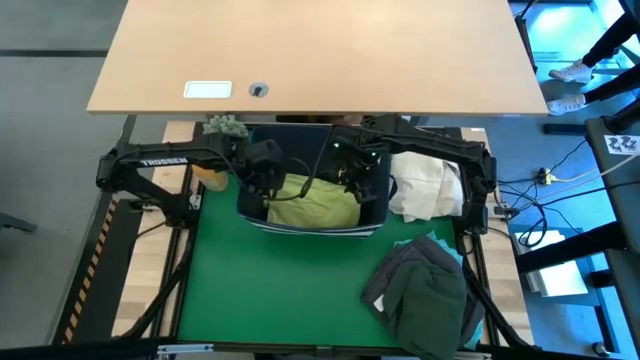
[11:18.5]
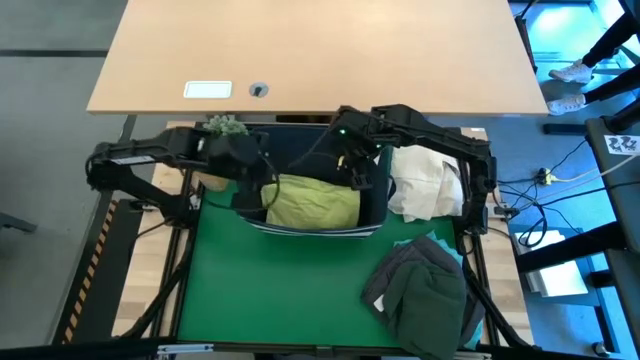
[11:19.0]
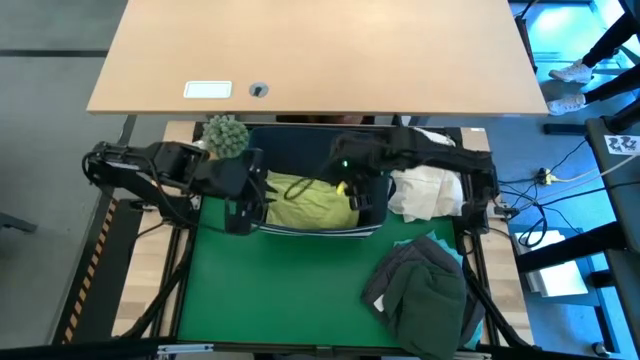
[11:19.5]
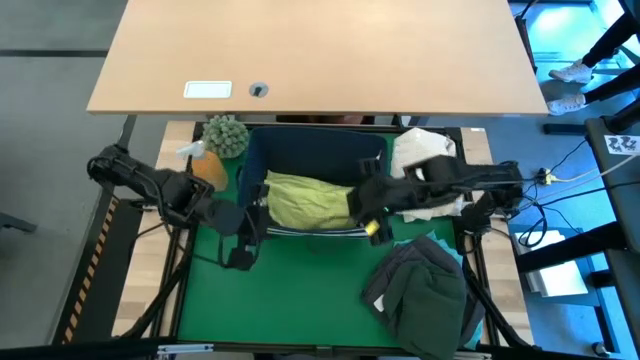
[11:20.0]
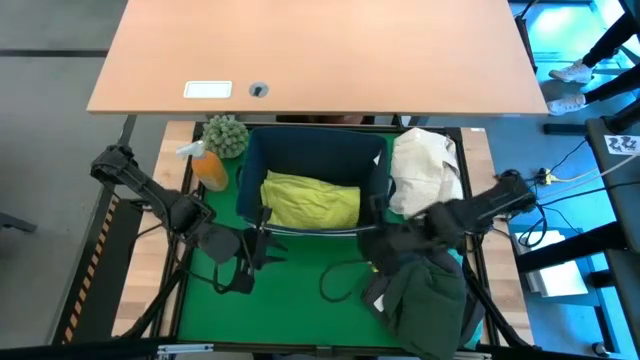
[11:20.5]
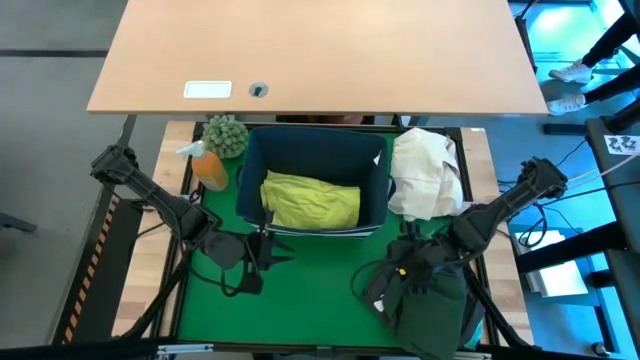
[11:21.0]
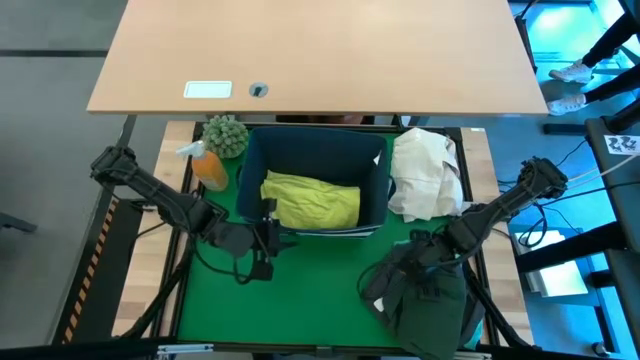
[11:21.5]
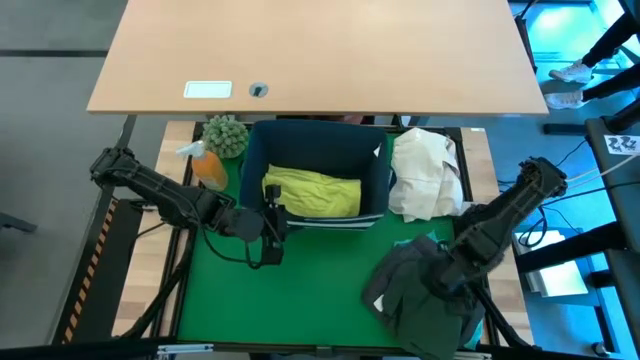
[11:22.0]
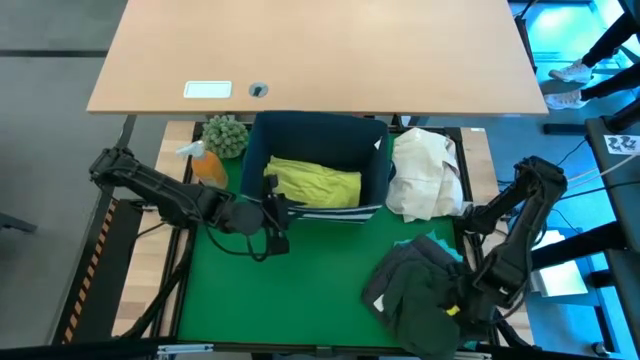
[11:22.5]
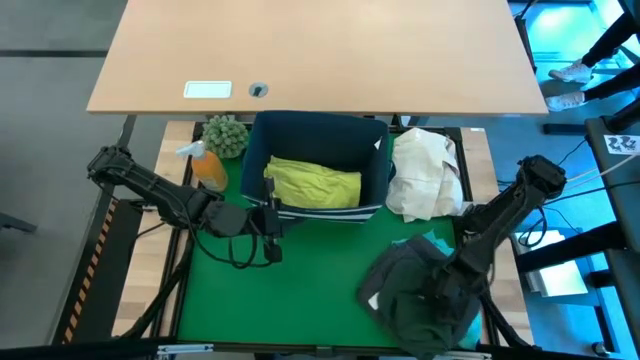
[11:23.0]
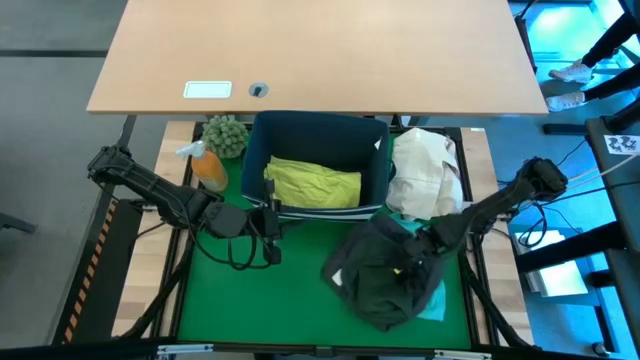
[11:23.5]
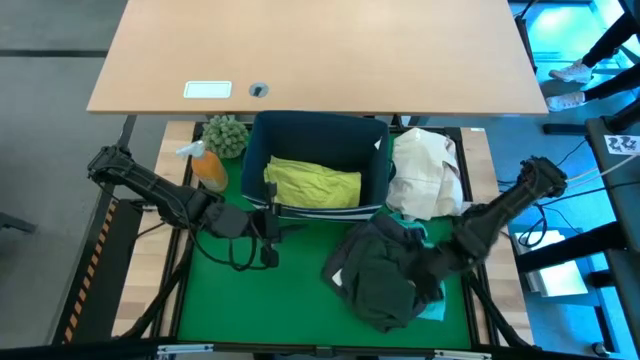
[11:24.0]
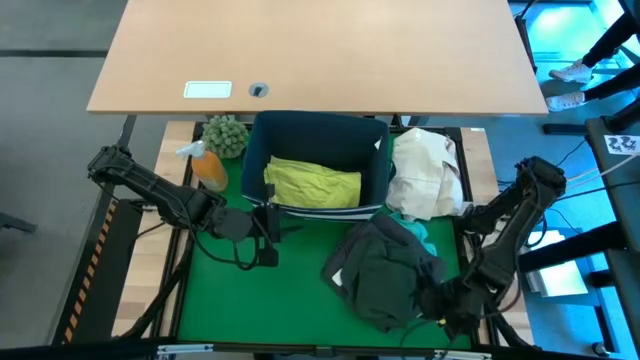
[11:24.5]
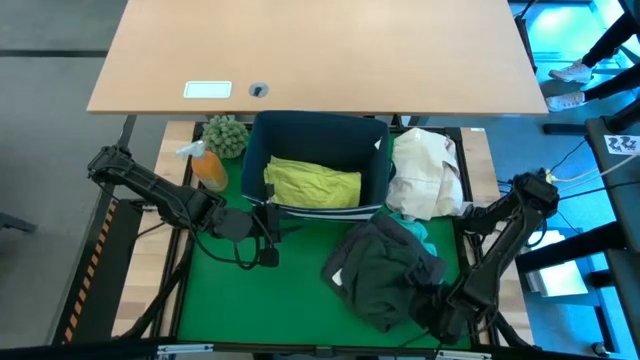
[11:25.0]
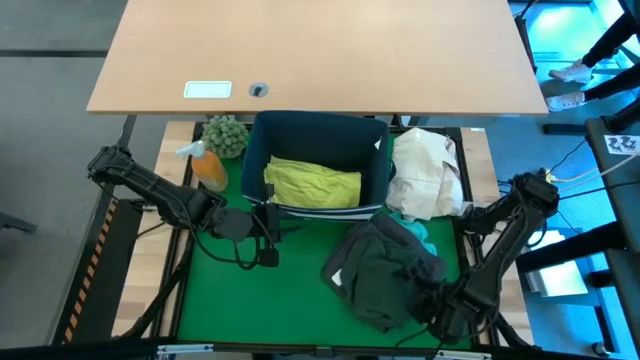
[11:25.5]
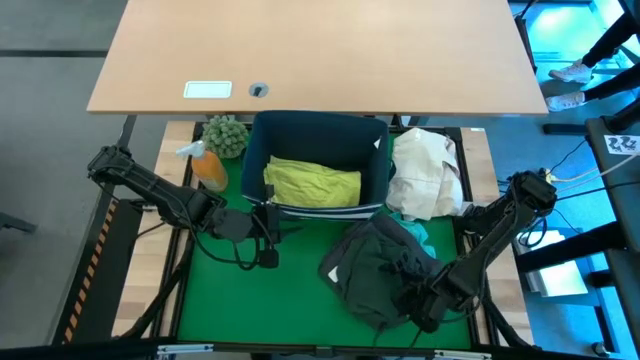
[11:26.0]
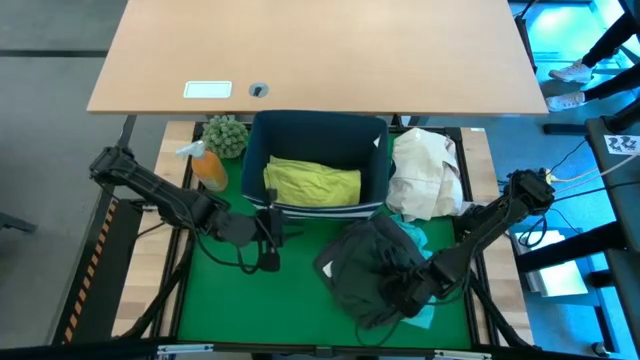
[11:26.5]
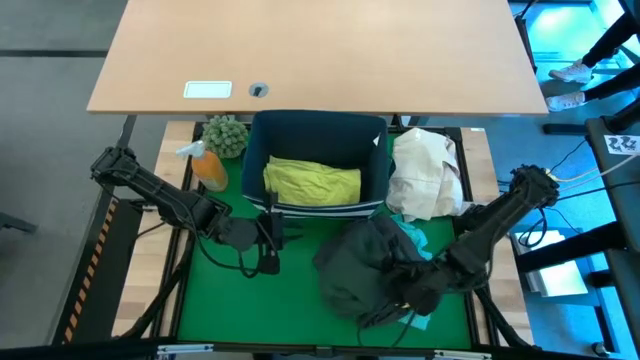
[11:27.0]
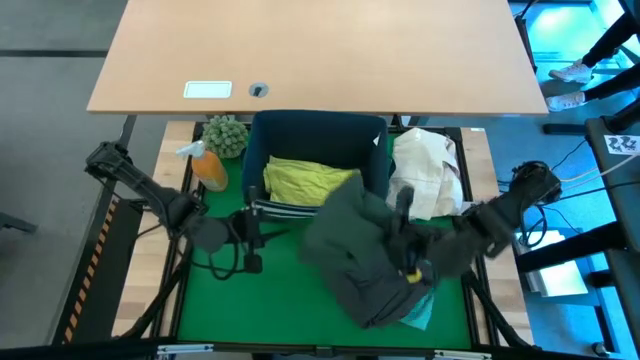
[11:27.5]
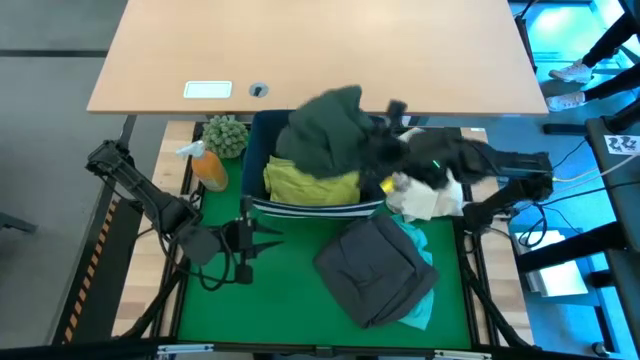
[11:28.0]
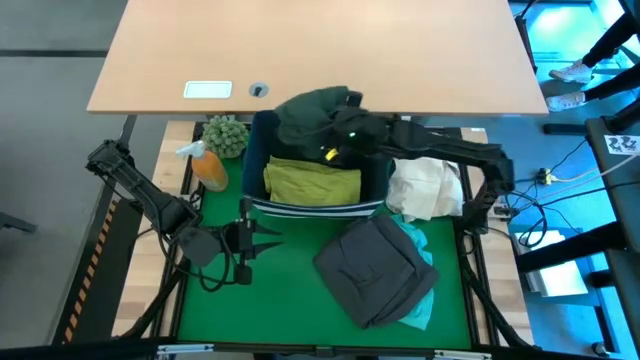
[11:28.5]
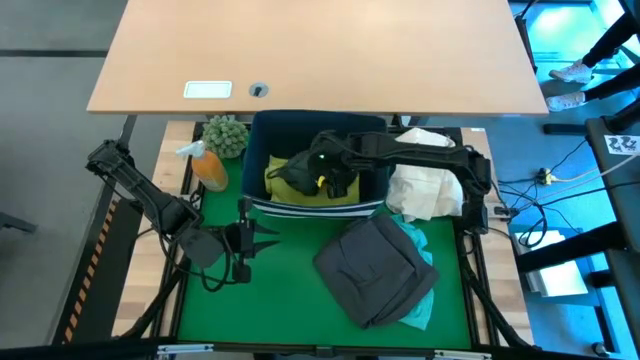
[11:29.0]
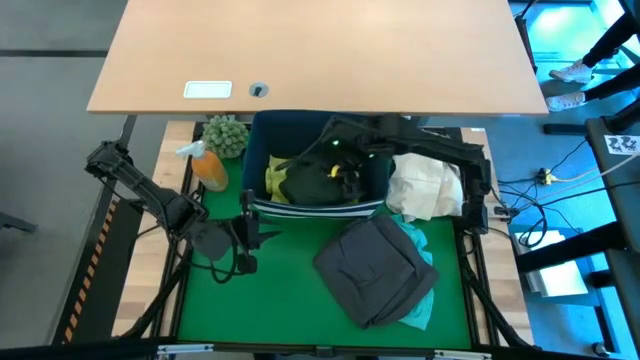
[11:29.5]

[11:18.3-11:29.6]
Task: Fold laundry
Put the green polo into the laundry bin

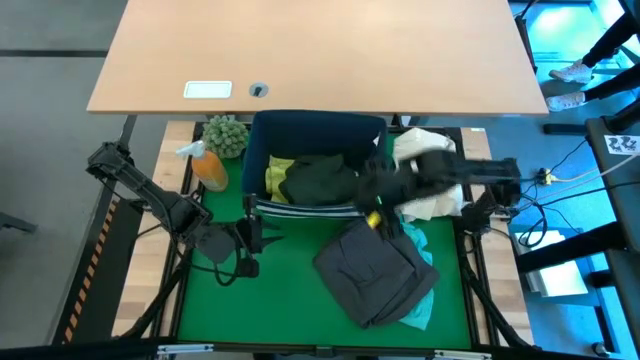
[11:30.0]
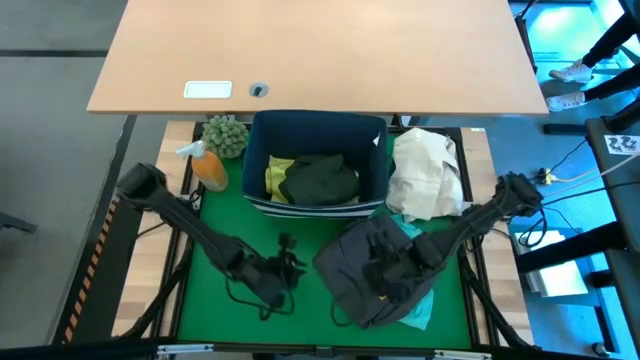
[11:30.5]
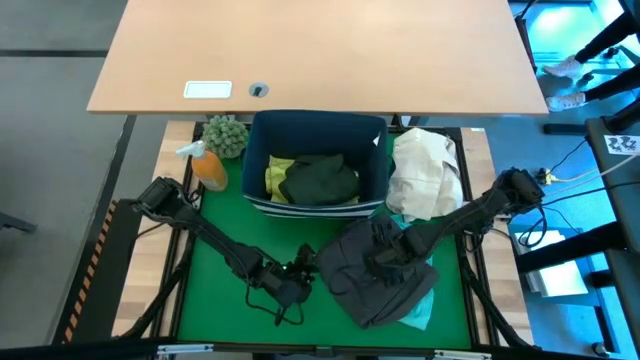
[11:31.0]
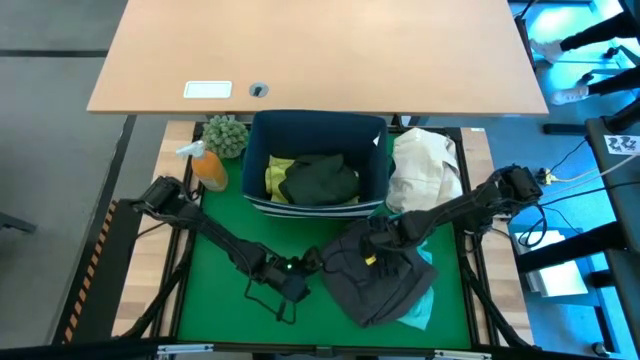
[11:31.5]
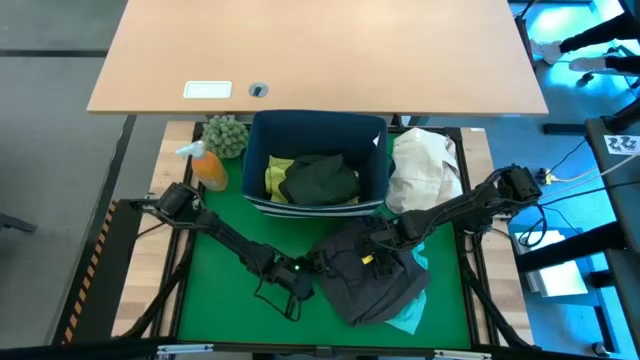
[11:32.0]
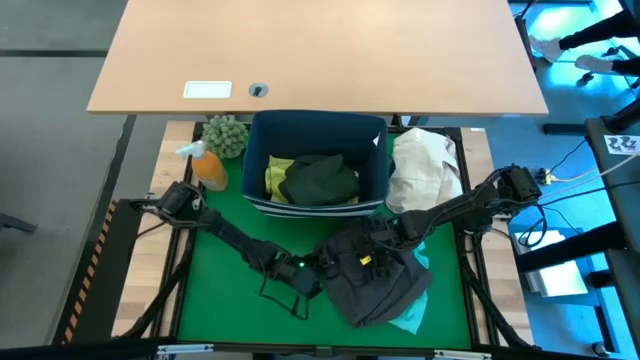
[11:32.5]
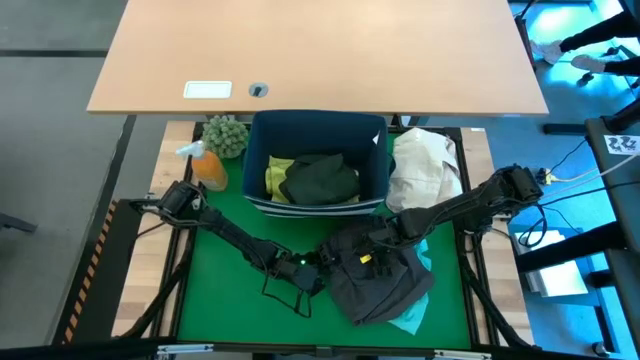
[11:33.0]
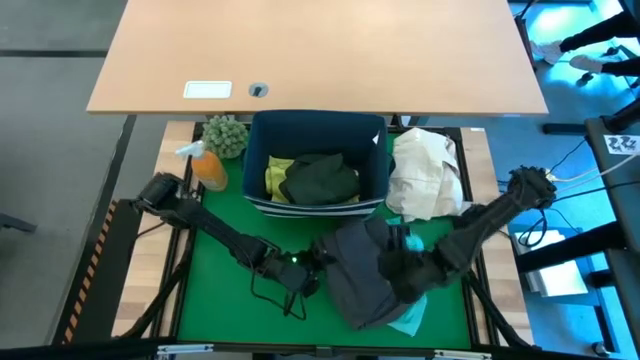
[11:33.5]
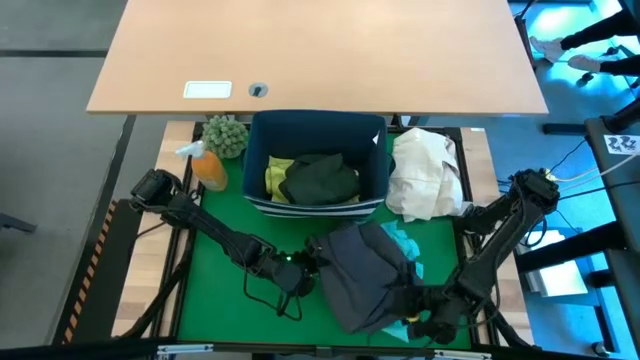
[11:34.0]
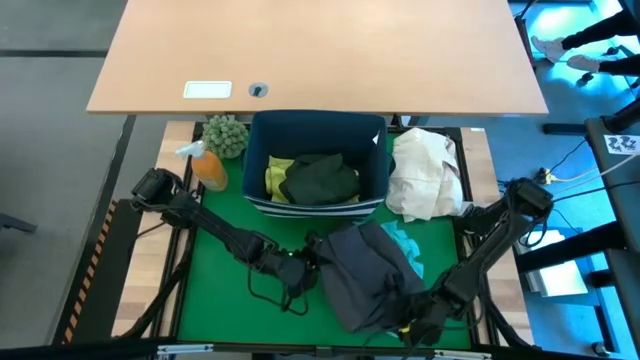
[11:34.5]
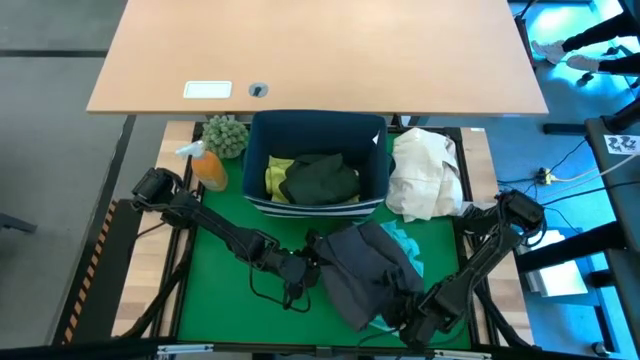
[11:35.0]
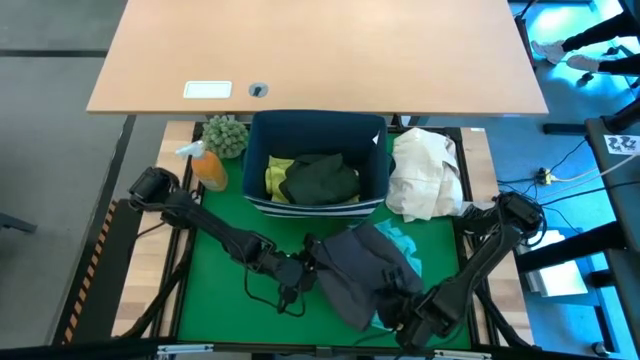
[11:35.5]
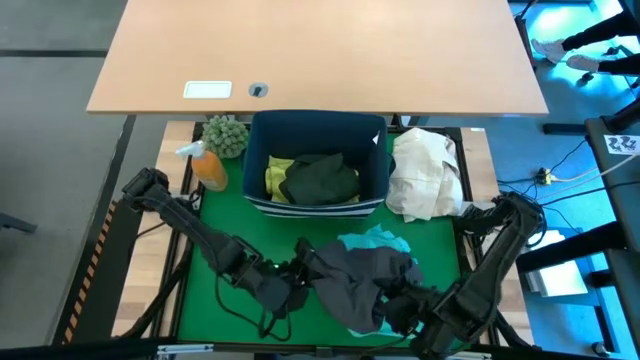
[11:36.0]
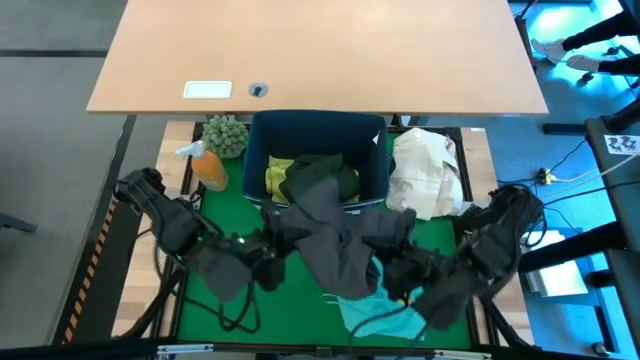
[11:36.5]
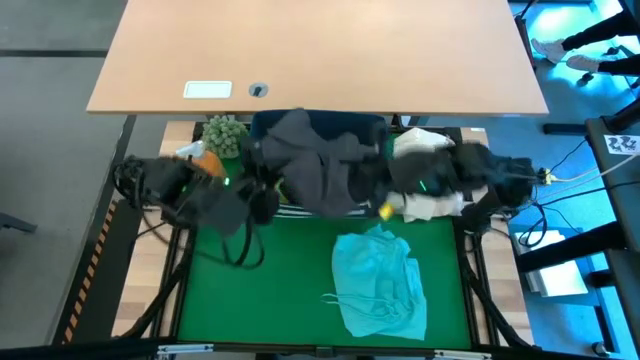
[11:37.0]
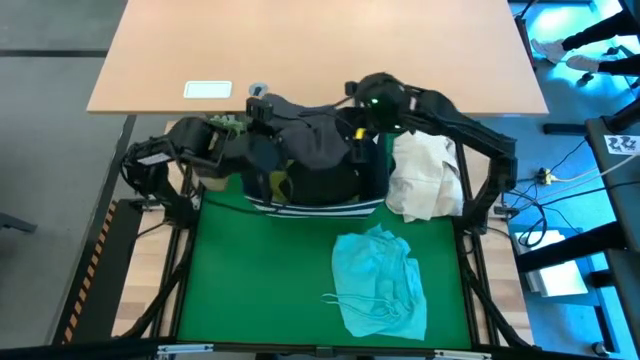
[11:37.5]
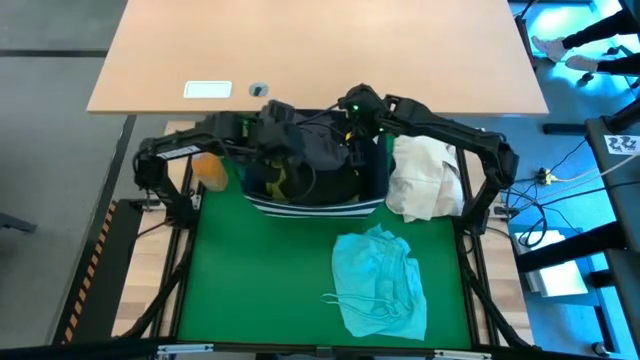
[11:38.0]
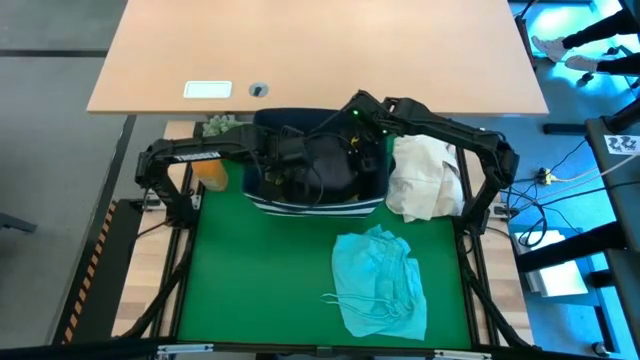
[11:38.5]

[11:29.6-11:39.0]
Put the black shorts into the laundry bin
